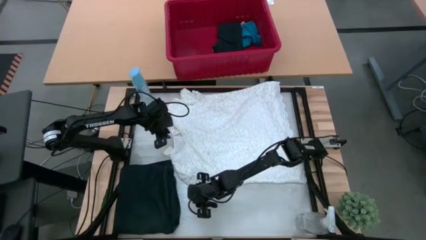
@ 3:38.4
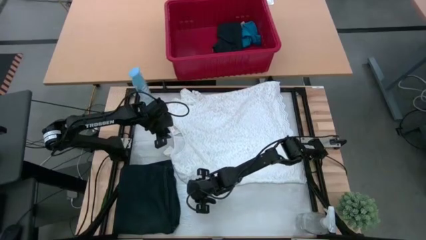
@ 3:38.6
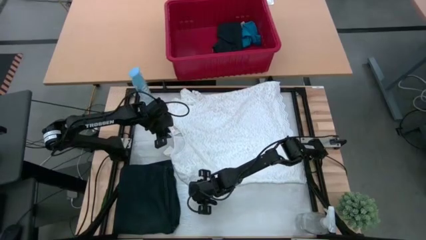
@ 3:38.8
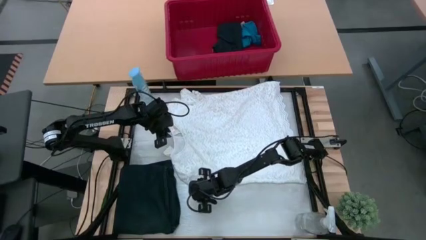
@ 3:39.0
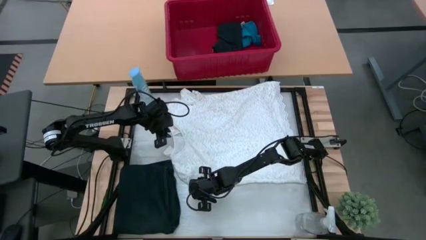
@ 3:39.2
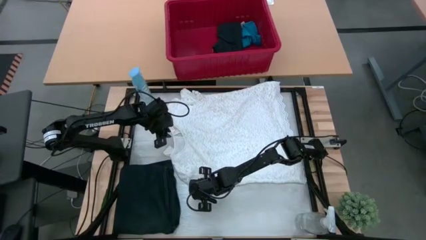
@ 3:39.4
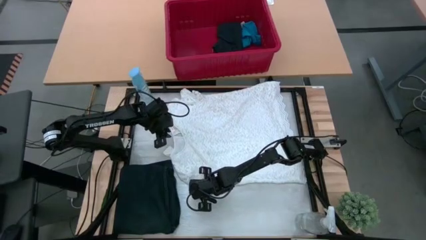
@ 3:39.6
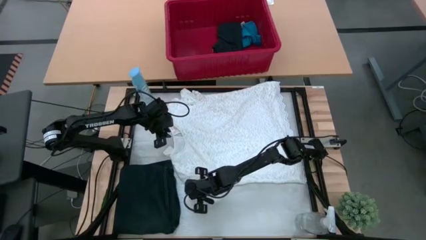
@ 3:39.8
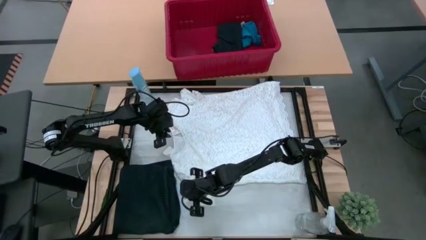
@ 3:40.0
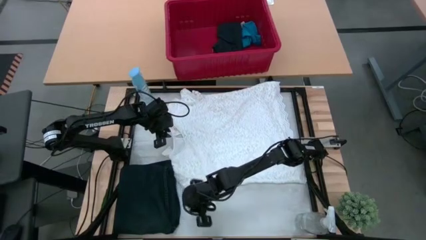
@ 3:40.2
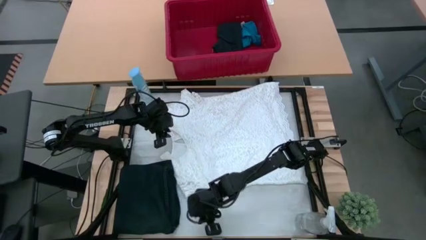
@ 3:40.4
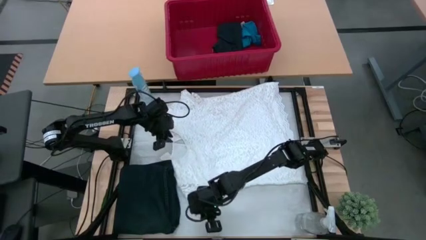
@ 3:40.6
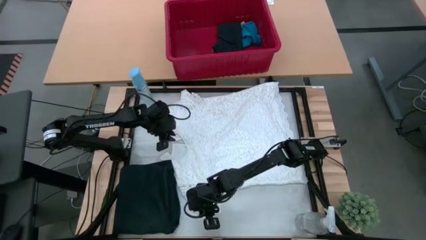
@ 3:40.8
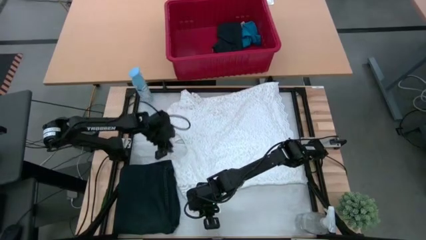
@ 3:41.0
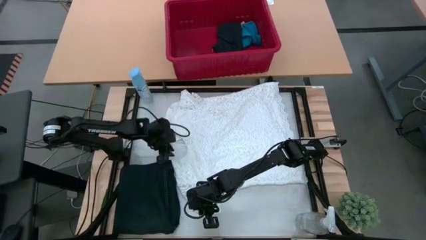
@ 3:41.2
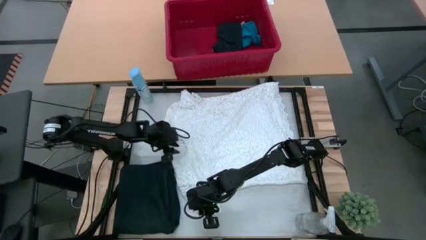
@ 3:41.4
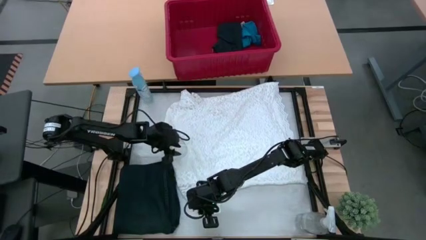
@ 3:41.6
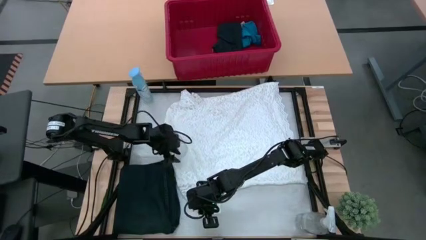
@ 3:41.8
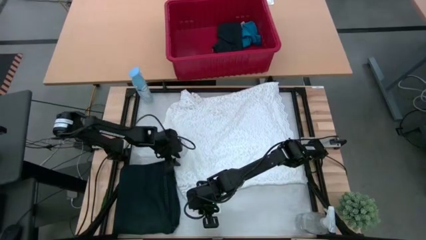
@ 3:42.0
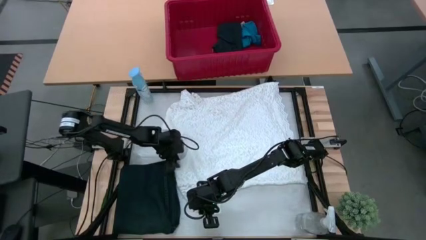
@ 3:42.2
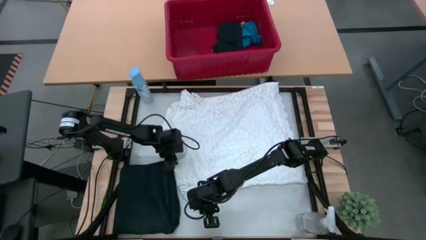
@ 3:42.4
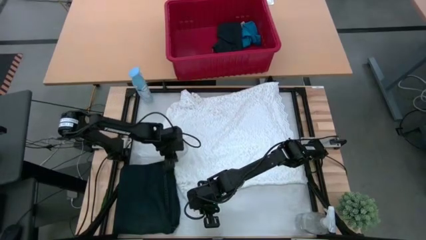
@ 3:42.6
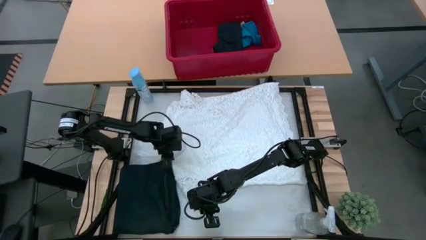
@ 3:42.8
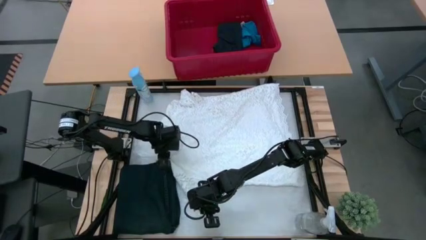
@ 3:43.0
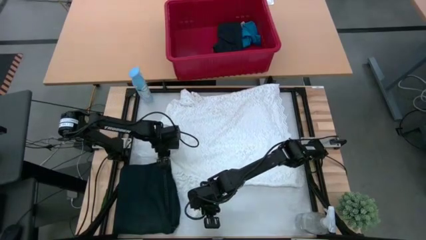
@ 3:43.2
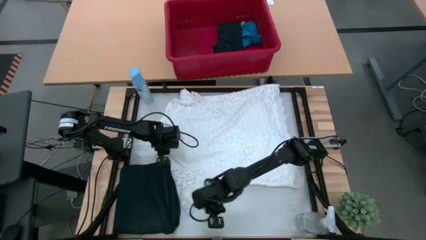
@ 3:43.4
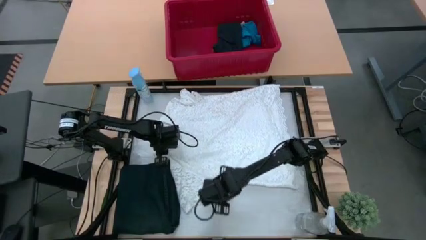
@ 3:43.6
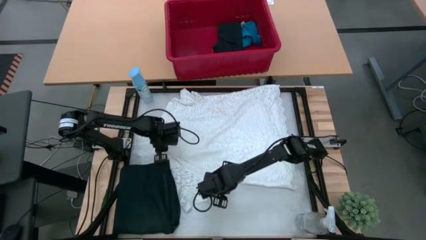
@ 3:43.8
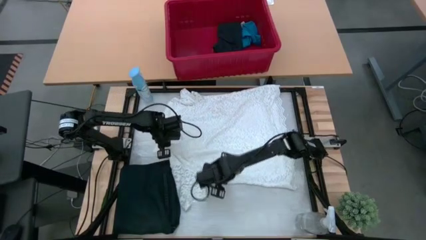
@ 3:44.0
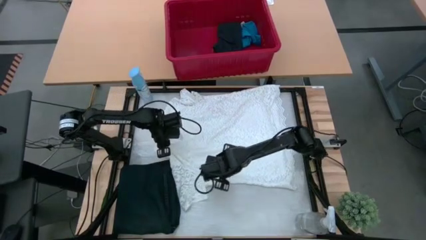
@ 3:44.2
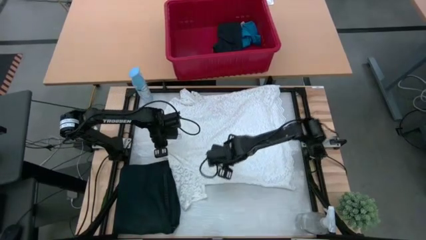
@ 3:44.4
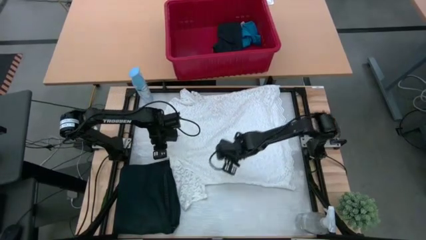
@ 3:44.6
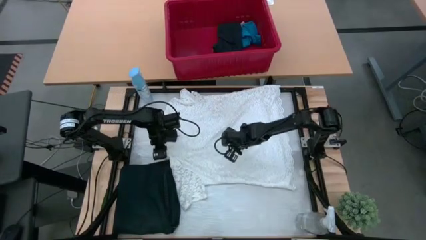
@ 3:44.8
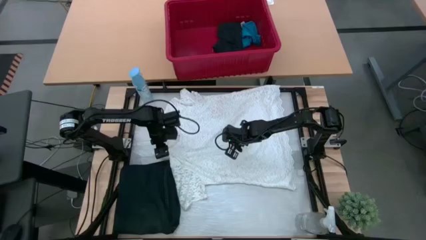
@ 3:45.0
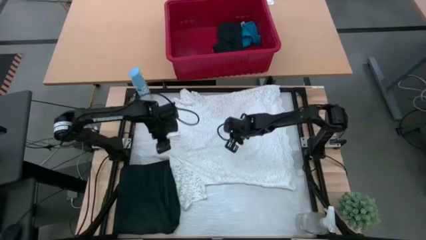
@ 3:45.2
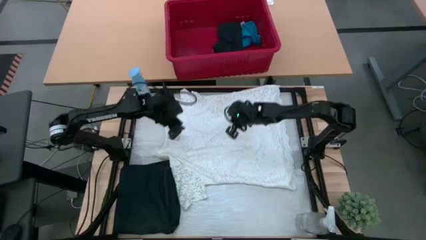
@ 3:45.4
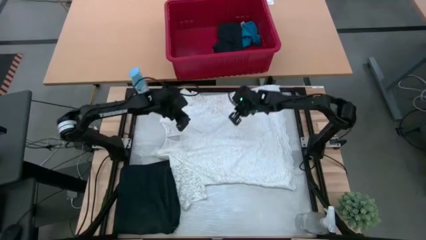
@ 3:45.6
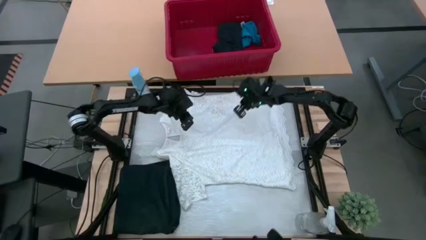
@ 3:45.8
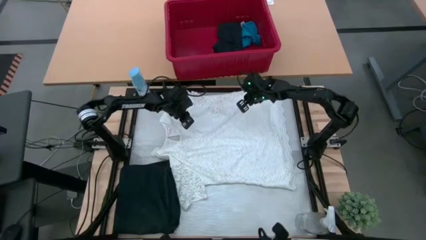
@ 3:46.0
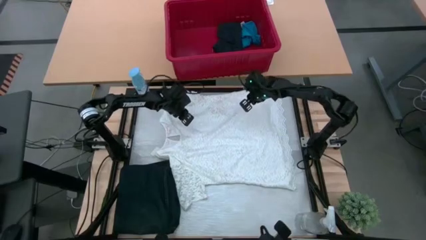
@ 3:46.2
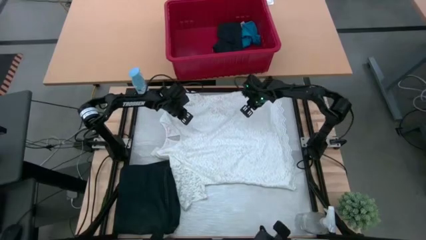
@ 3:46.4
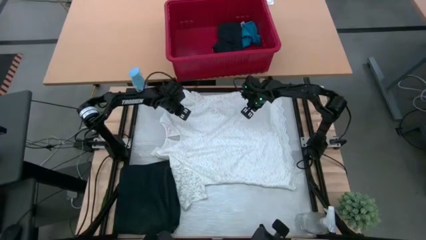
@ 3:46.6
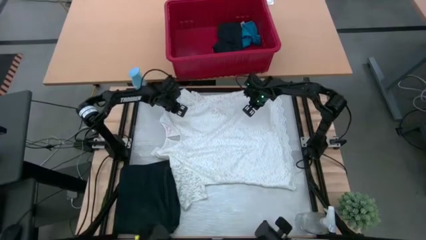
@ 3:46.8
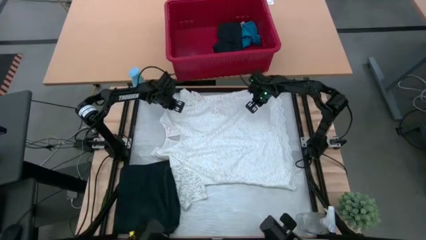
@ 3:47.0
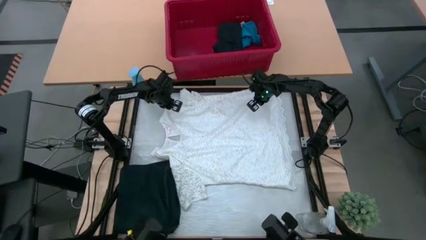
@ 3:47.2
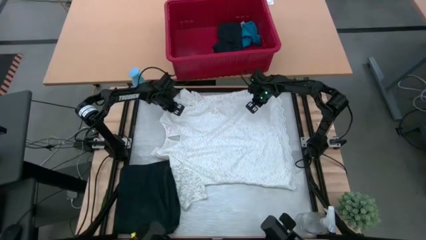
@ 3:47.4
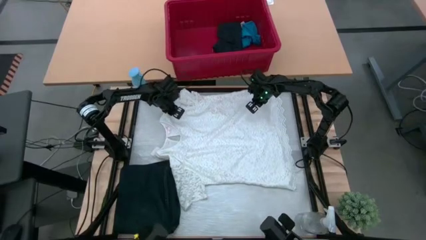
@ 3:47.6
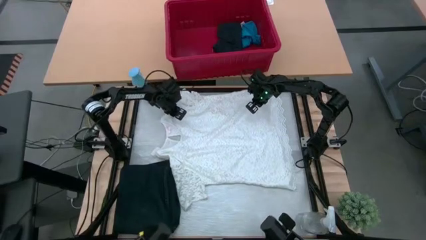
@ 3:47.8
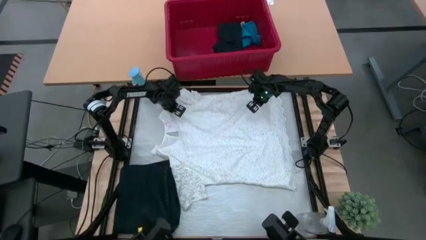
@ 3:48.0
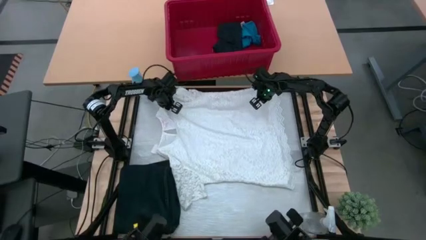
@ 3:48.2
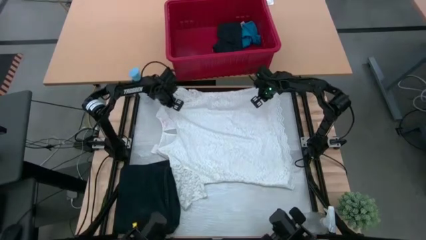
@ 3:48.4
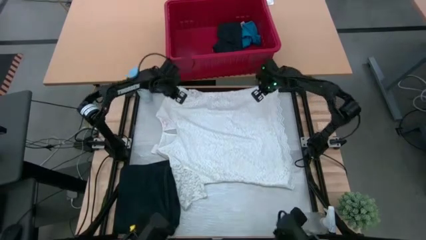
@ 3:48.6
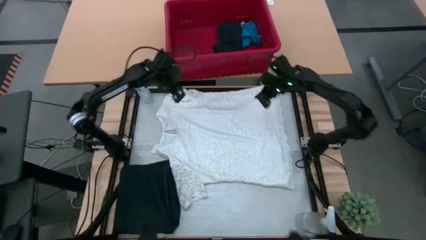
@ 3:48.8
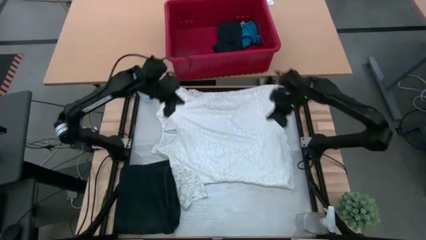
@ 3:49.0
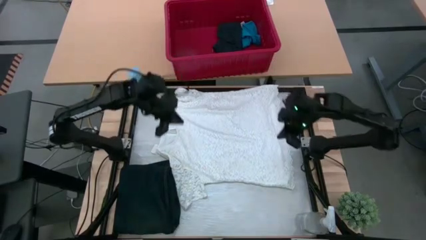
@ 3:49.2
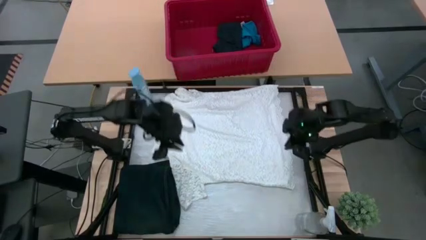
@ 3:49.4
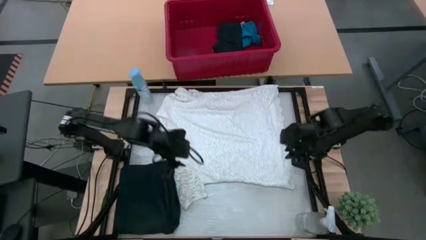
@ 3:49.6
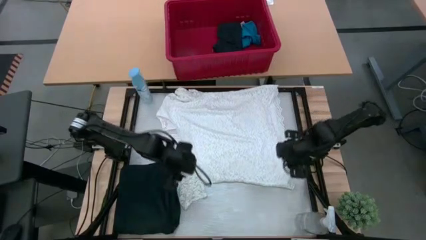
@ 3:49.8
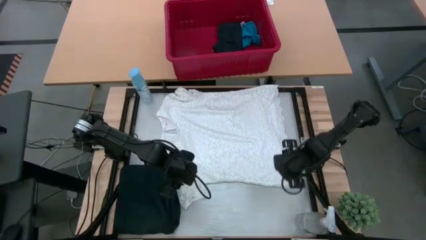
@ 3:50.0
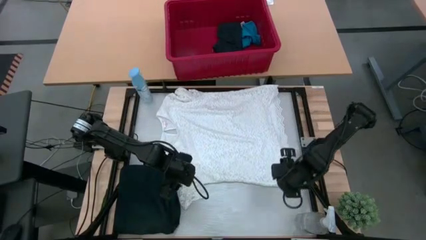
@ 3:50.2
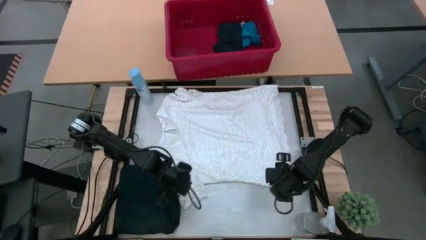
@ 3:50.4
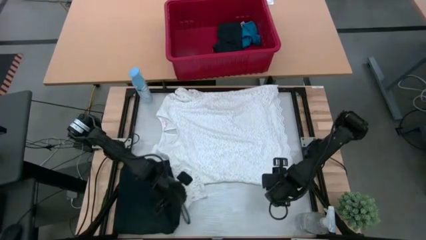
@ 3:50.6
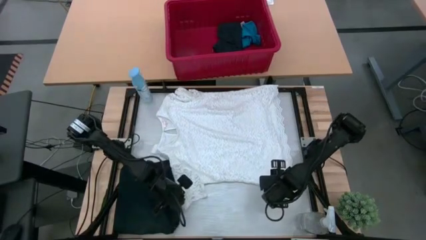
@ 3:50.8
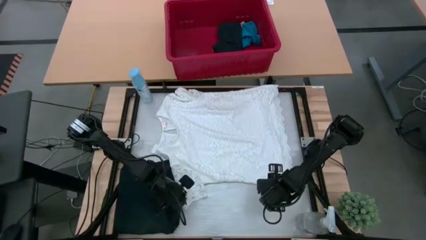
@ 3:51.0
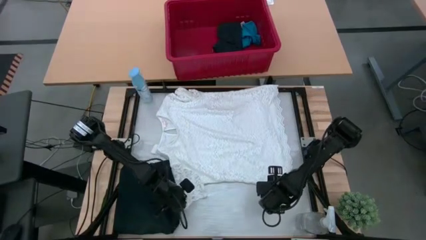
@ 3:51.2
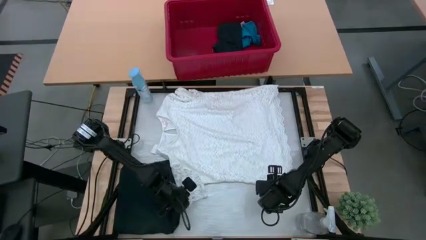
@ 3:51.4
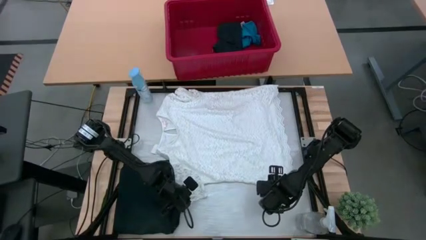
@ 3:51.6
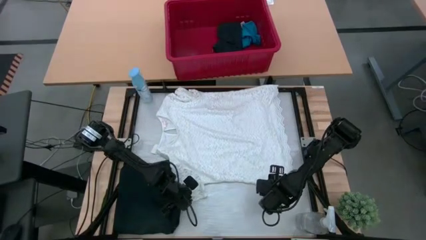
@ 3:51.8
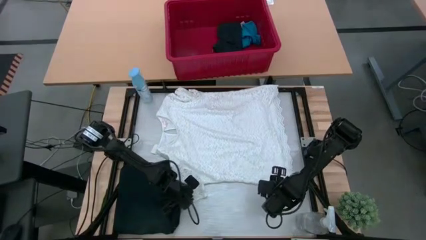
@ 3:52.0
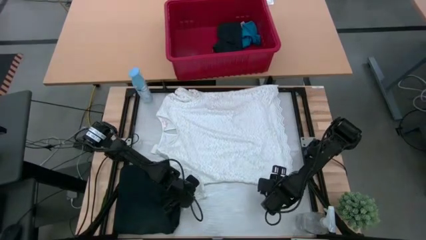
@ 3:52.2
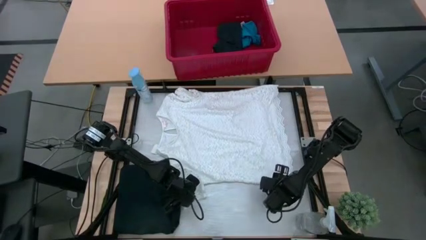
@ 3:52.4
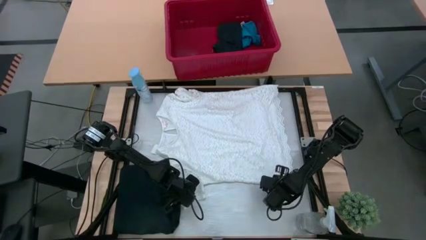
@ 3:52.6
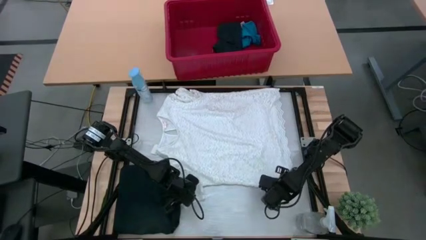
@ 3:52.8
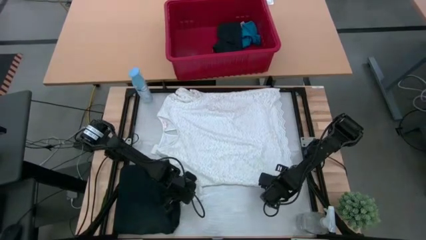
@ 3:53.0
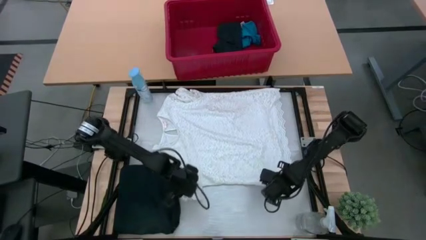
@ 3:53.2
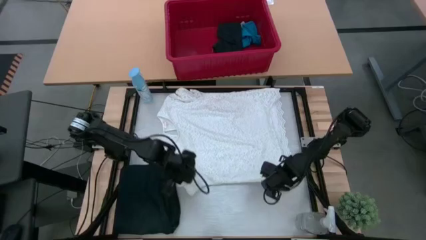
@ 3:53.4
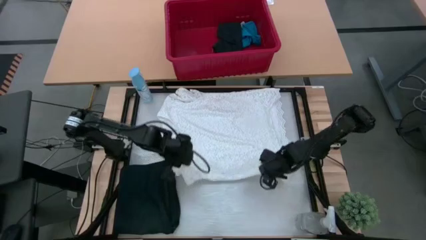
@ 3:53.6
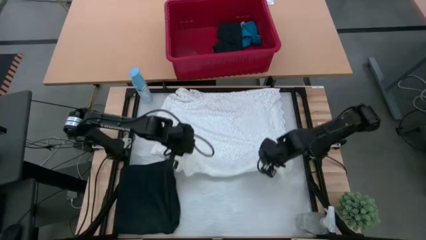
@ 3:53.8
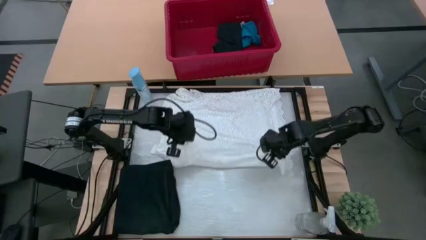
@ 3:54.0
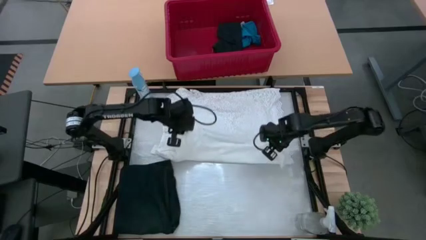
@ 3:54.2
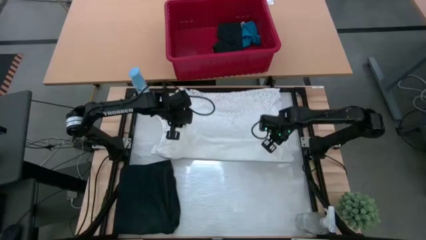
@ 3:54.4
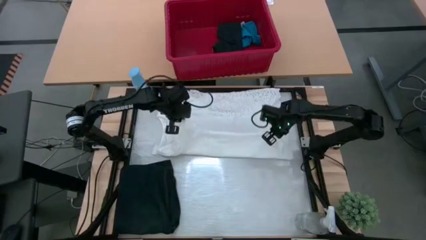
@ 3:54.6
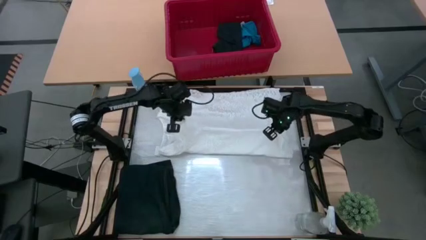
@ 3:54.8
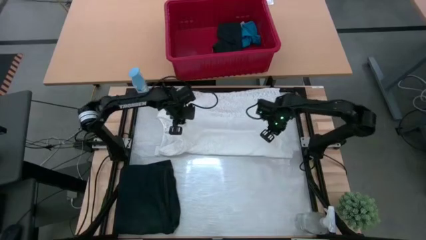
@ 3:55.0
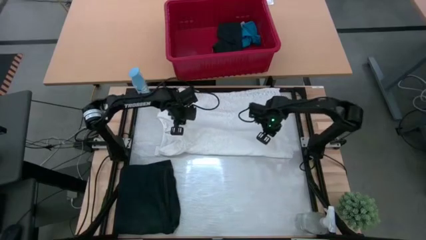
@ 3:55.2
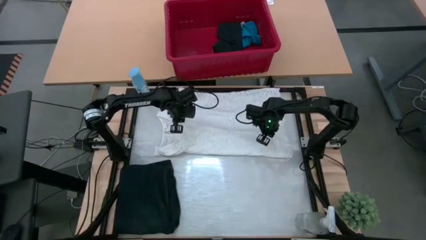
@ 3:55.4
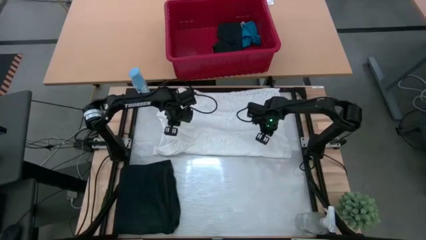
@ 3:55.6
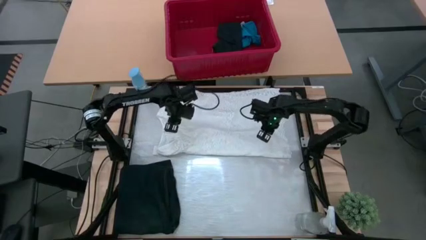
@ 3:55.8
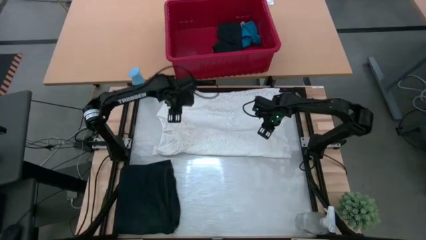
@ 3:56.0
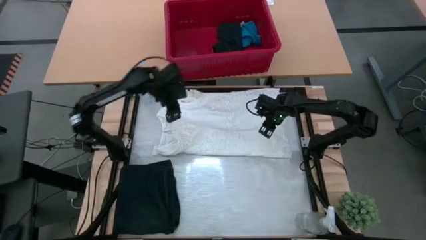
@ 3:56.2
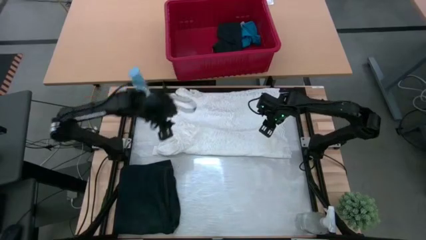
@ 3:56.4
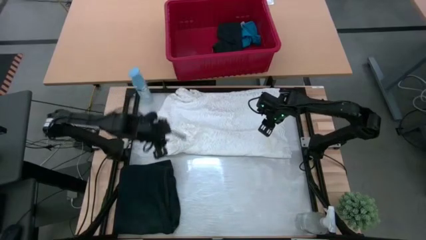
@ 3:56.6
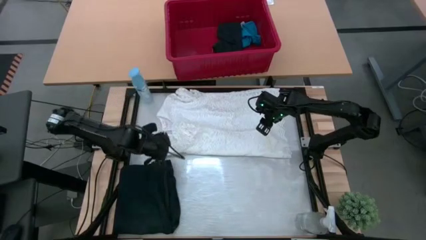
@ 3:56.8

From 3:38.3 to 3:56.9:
Task: Fold Laundry from Bin
Fold the white dress from the red bin
